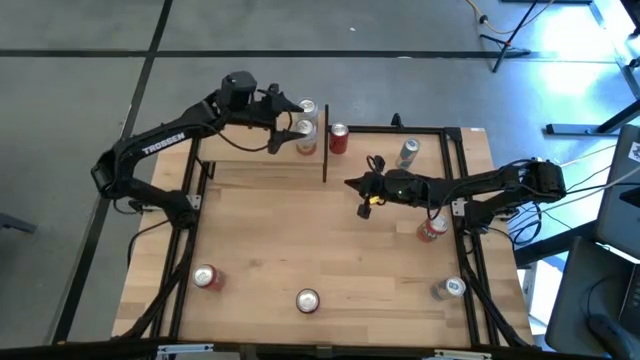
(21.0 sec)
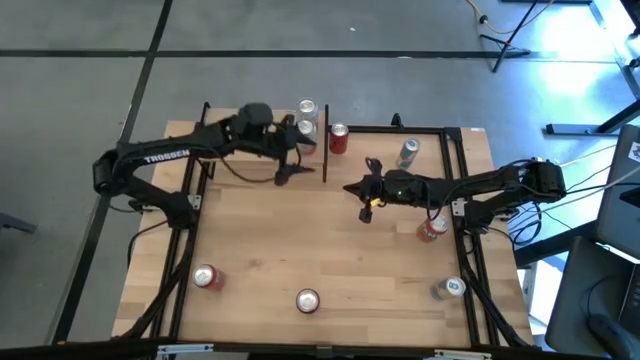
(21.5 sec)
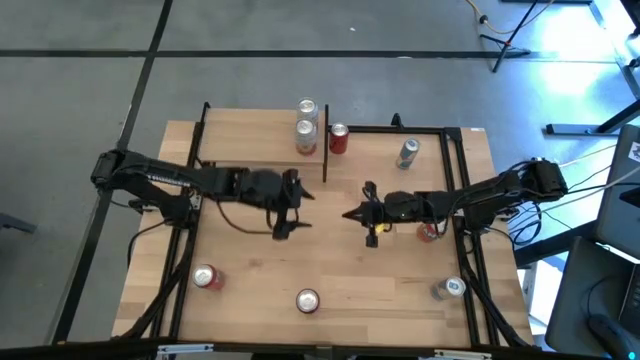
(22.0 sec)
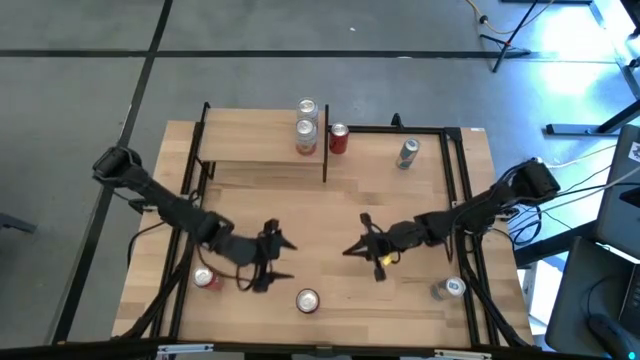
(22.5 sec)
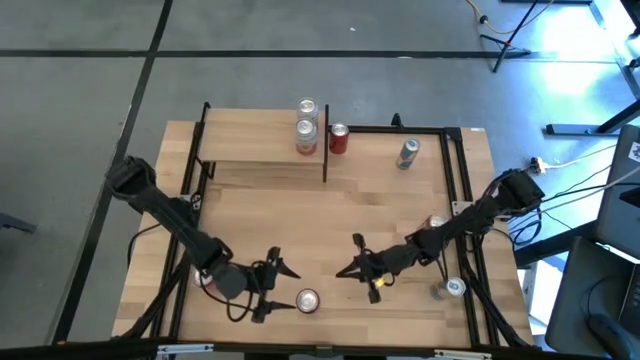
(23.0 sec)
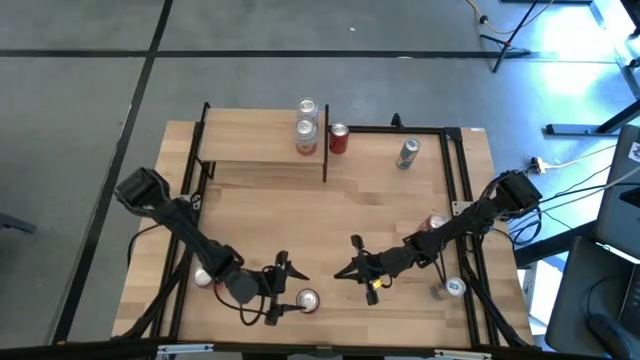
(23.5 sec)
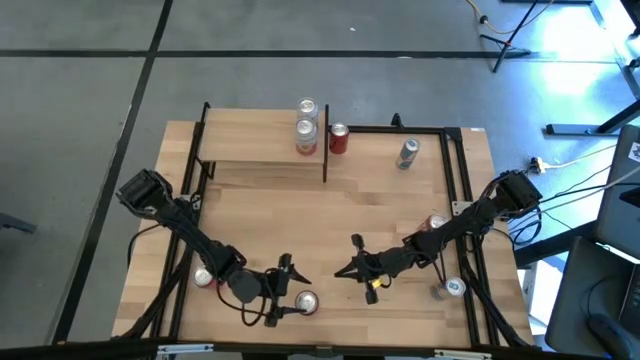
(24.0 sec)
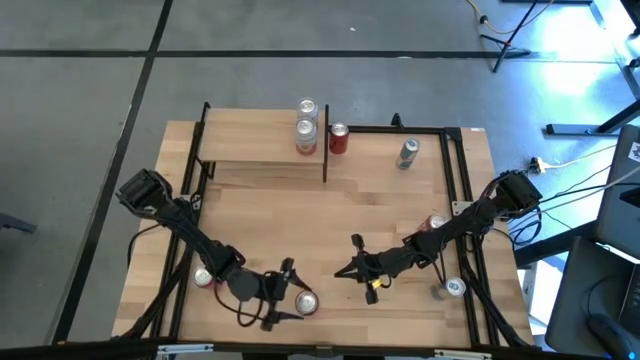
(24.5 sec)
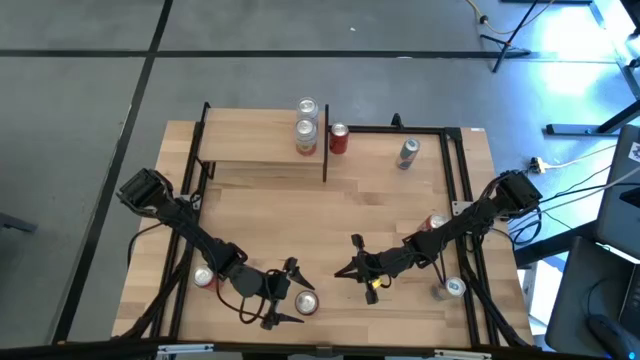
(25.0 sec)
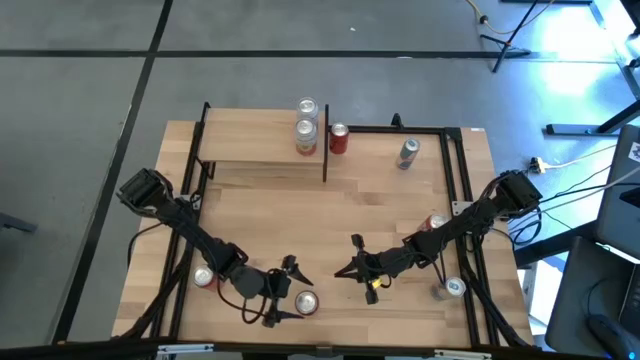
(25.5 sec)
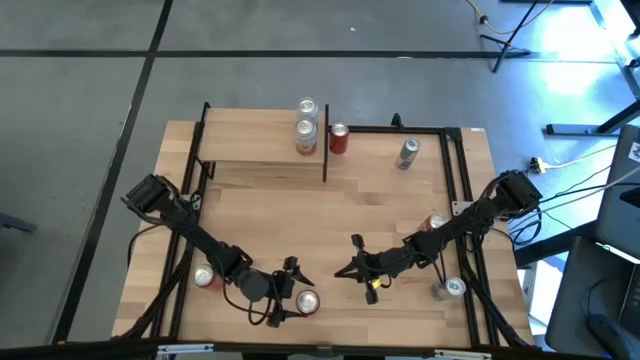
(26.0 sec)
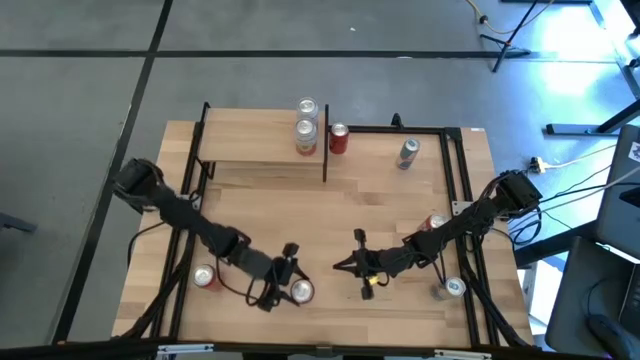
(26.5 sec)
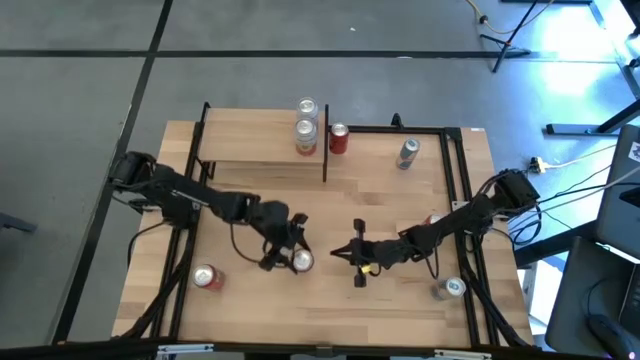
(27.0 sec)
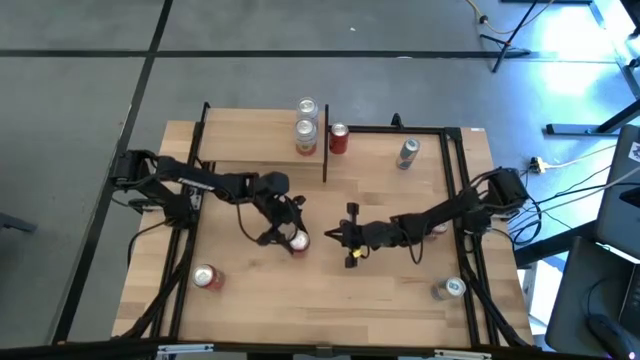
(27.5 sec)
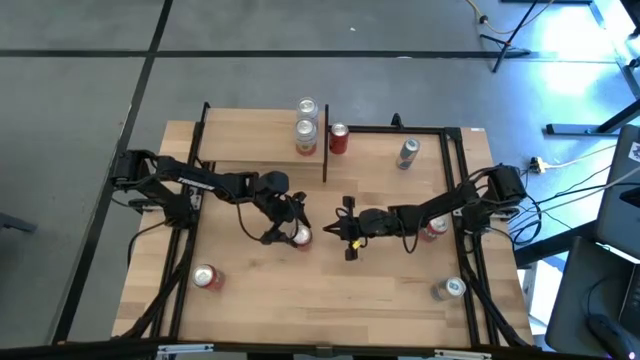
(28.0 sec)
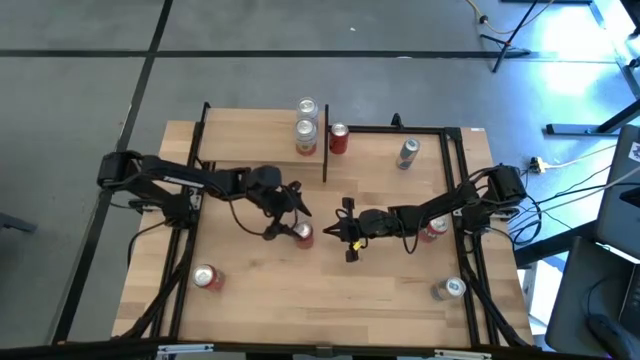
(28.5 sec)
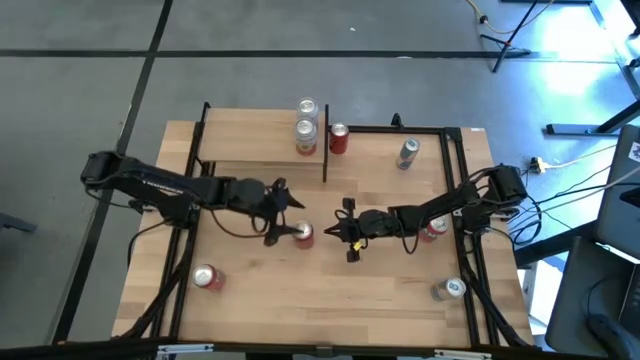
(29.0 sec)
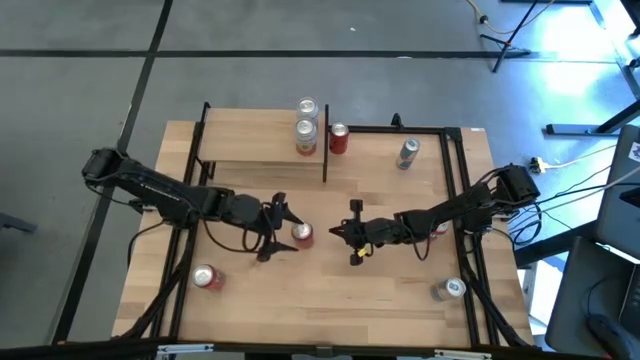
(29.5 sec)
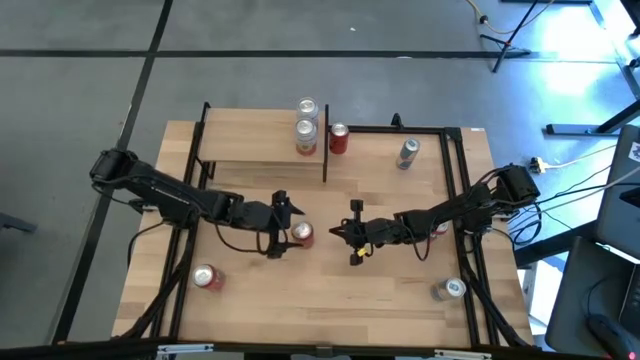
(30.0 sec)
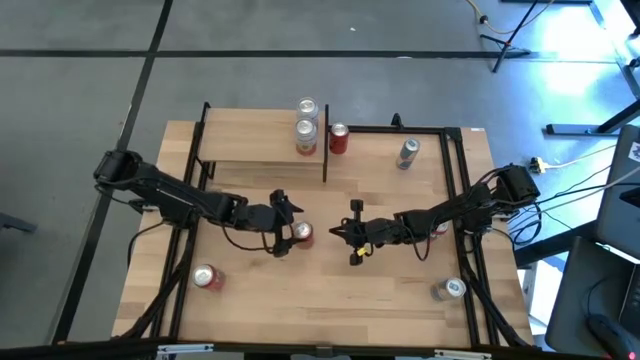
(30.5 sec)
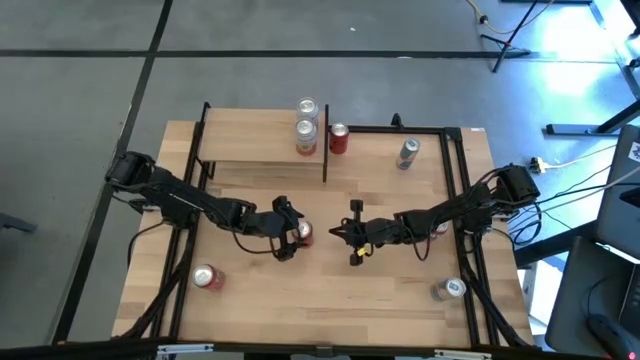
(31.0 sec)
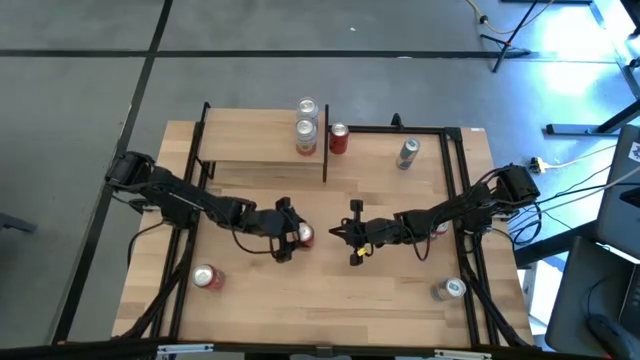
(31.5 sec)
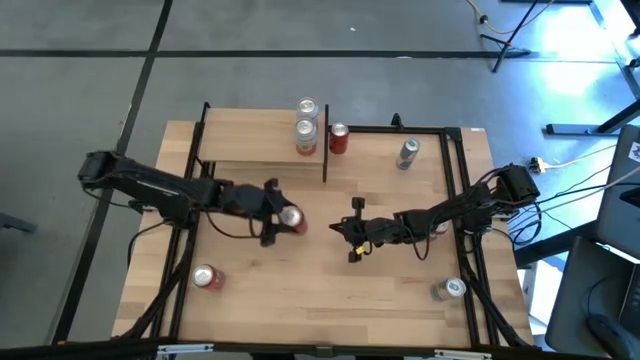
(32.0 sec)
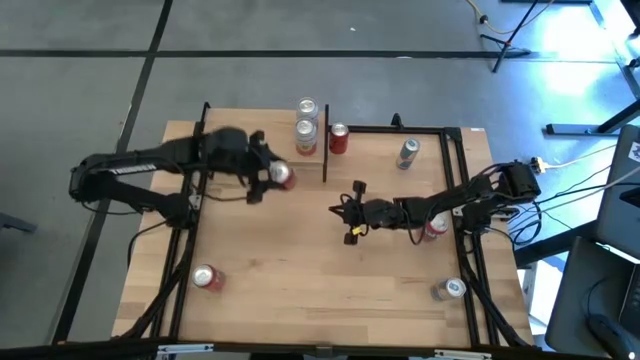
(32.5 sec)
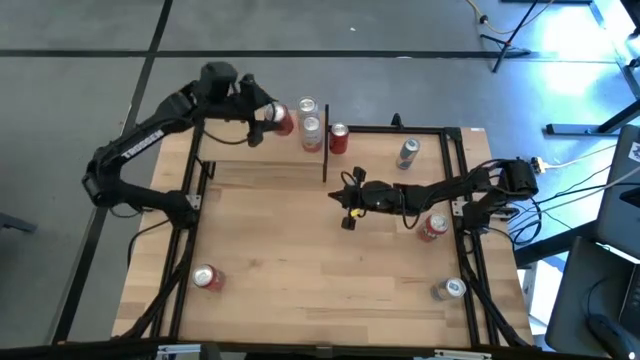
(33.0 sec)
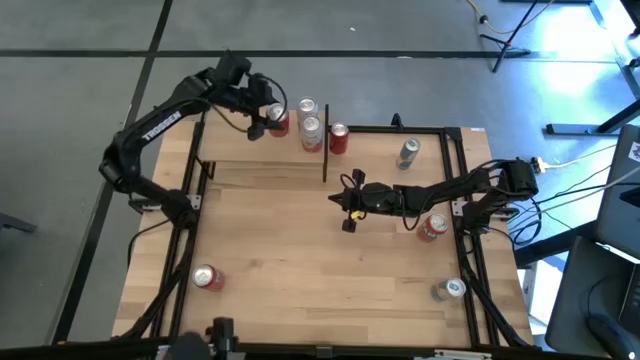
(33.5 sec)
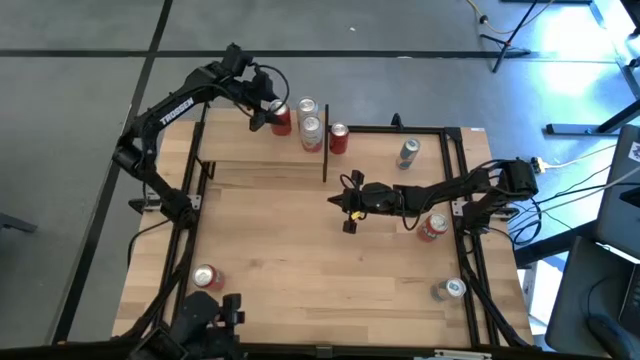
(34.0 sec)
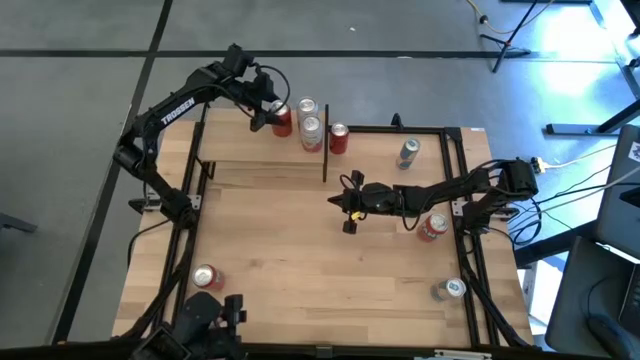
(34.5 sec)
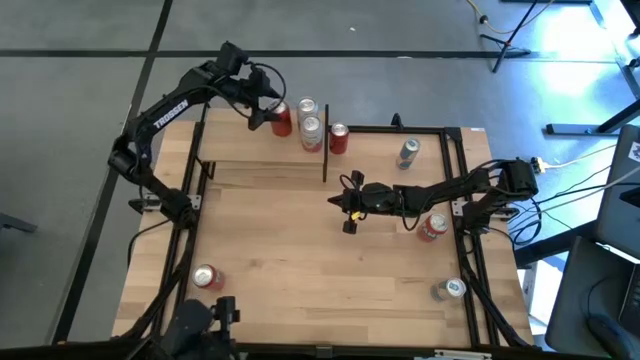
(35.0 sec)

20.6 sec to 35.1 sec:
Task: Place canned beverage on shelf
Put the bottom red black soda can on the shelf
